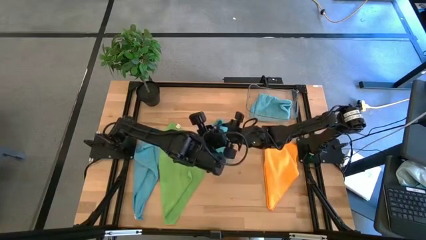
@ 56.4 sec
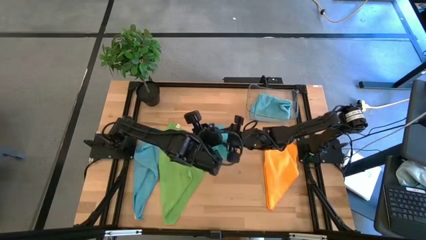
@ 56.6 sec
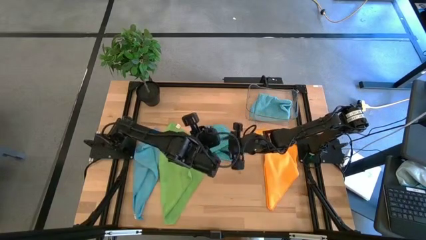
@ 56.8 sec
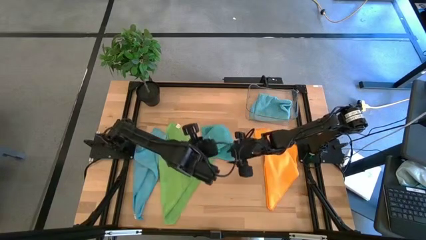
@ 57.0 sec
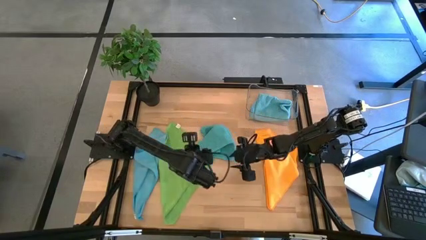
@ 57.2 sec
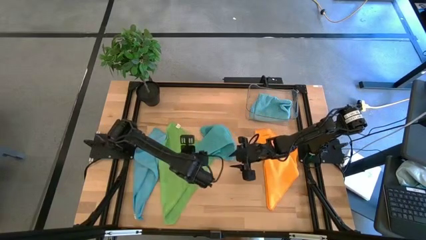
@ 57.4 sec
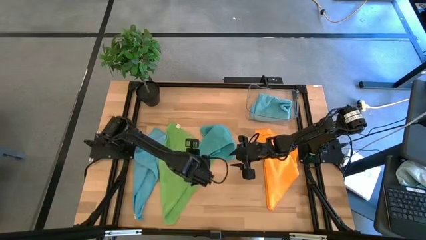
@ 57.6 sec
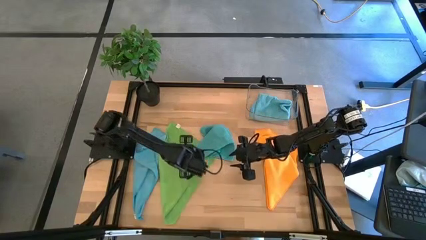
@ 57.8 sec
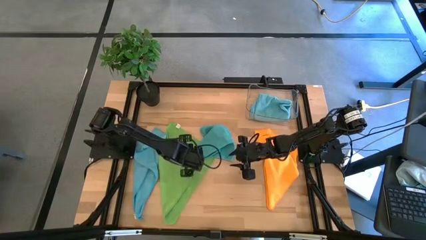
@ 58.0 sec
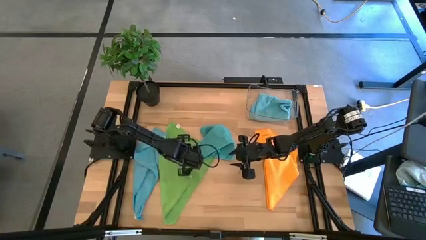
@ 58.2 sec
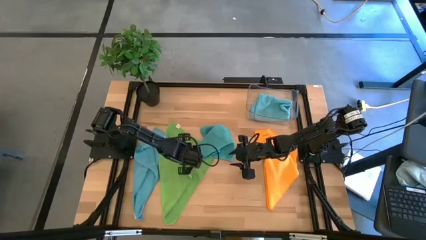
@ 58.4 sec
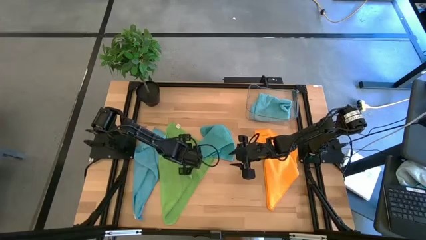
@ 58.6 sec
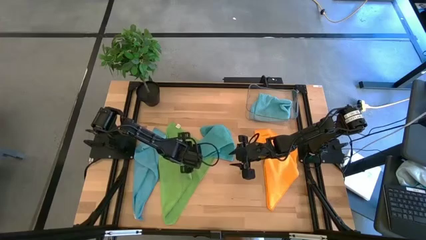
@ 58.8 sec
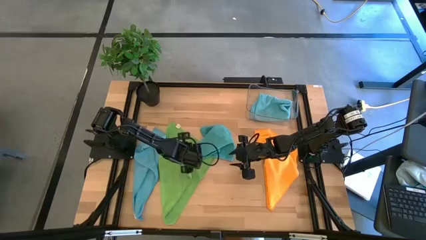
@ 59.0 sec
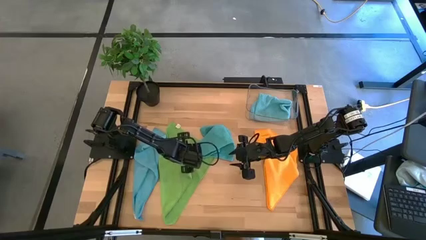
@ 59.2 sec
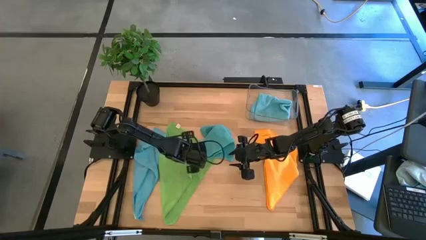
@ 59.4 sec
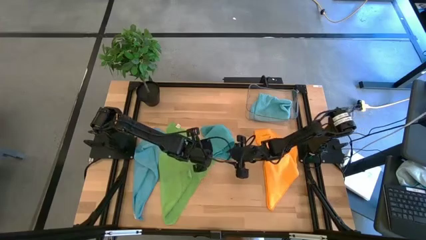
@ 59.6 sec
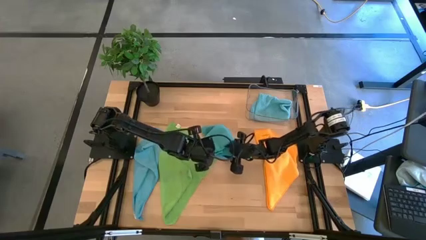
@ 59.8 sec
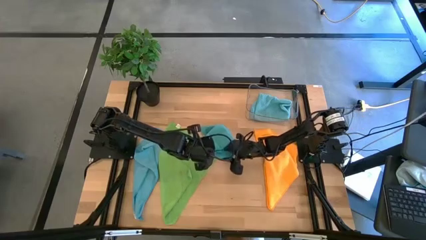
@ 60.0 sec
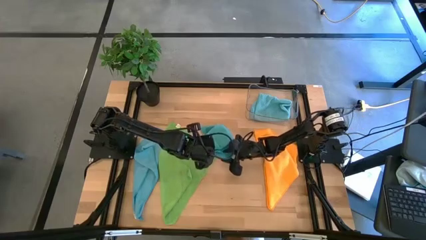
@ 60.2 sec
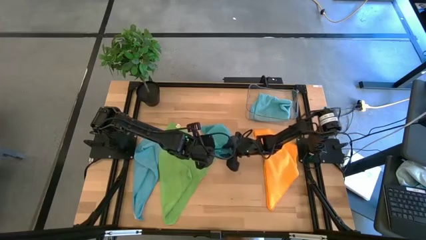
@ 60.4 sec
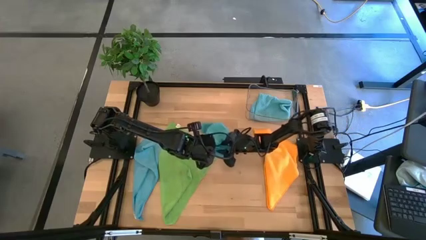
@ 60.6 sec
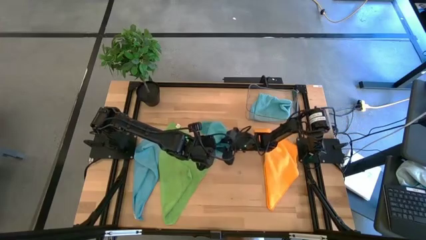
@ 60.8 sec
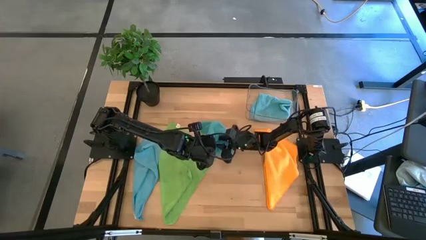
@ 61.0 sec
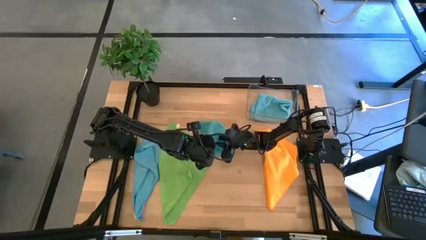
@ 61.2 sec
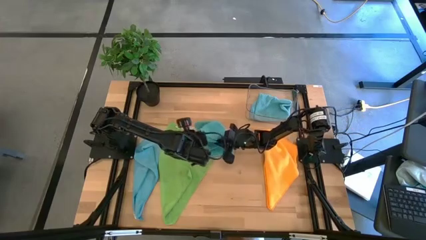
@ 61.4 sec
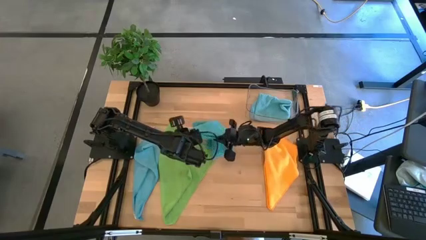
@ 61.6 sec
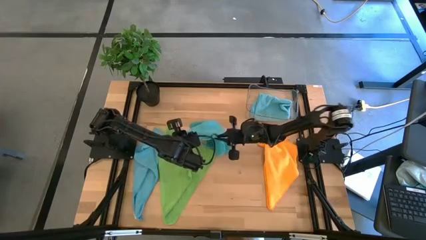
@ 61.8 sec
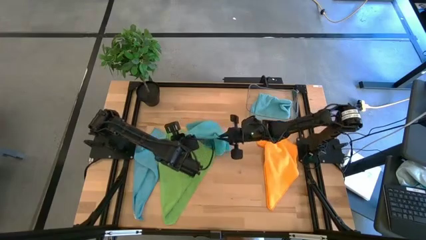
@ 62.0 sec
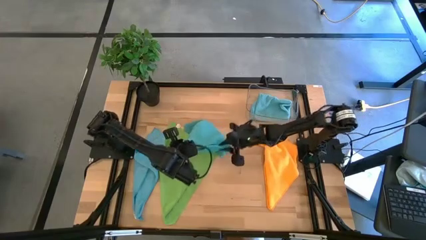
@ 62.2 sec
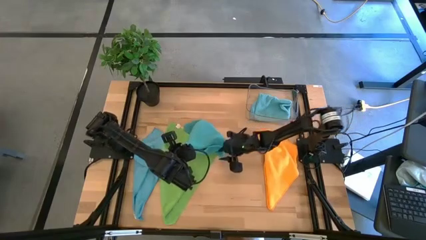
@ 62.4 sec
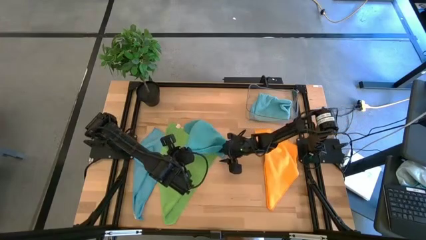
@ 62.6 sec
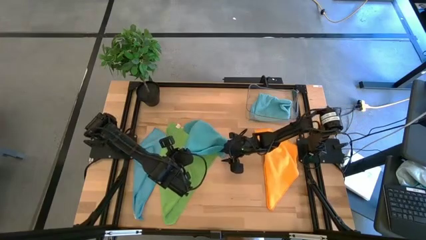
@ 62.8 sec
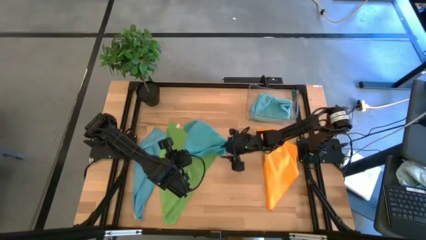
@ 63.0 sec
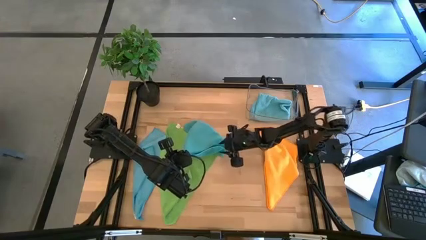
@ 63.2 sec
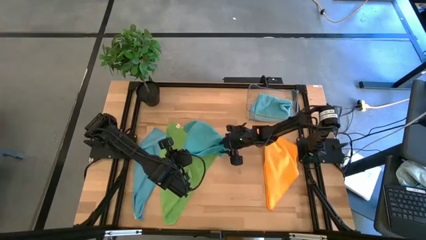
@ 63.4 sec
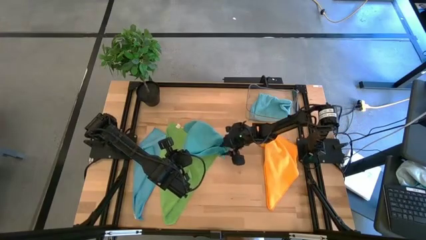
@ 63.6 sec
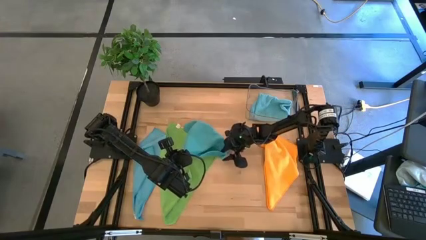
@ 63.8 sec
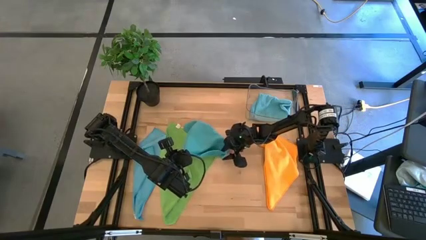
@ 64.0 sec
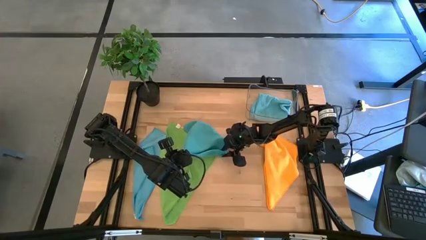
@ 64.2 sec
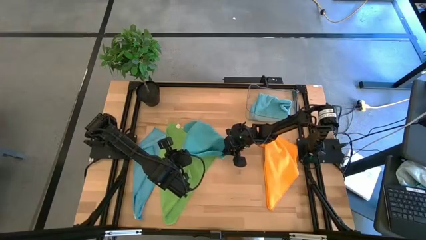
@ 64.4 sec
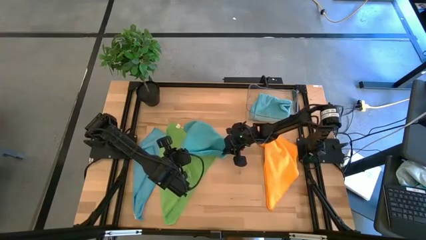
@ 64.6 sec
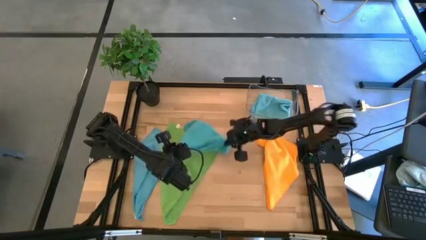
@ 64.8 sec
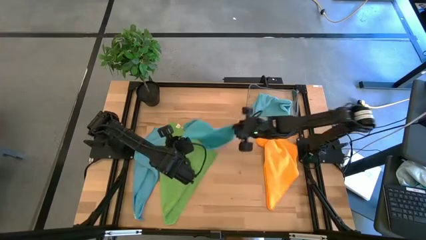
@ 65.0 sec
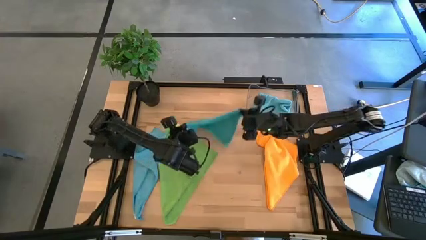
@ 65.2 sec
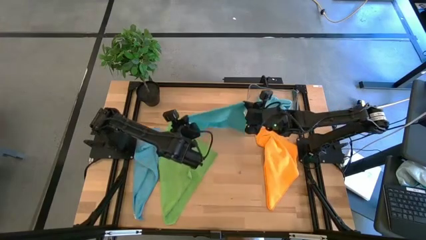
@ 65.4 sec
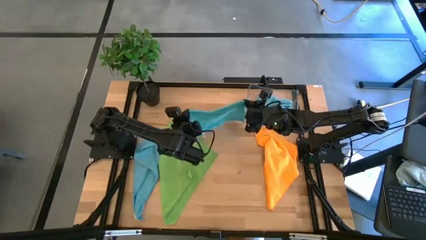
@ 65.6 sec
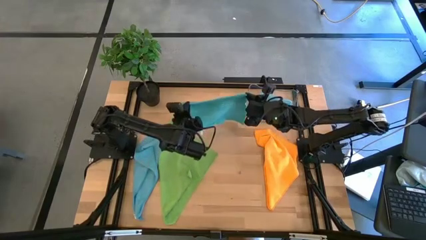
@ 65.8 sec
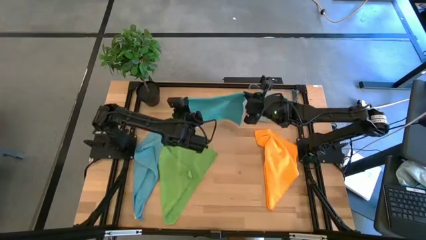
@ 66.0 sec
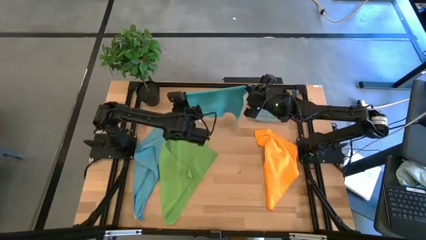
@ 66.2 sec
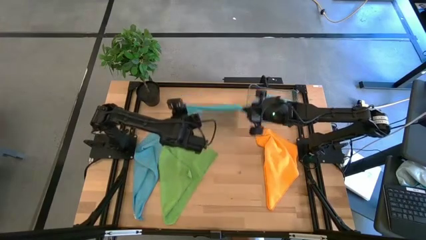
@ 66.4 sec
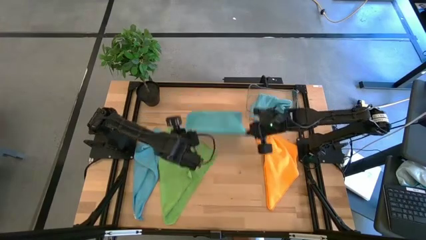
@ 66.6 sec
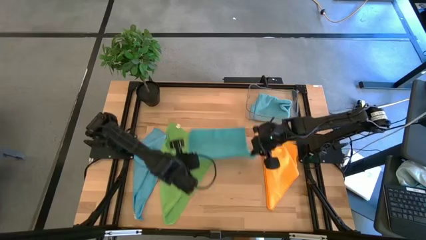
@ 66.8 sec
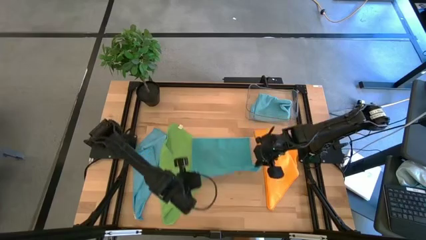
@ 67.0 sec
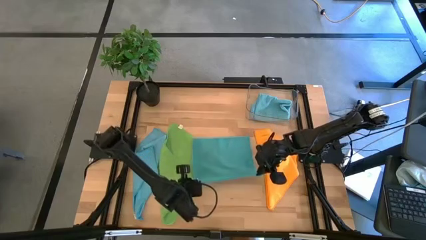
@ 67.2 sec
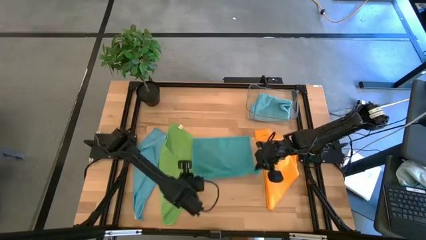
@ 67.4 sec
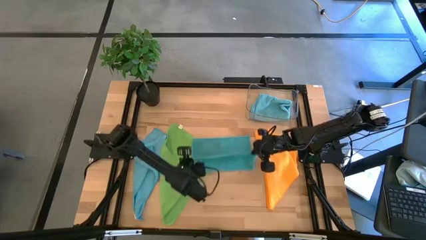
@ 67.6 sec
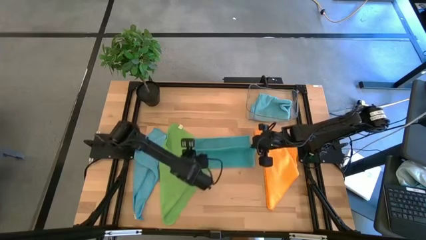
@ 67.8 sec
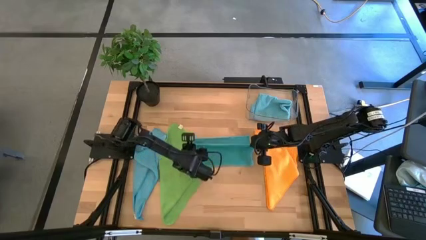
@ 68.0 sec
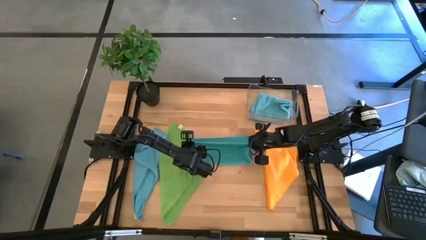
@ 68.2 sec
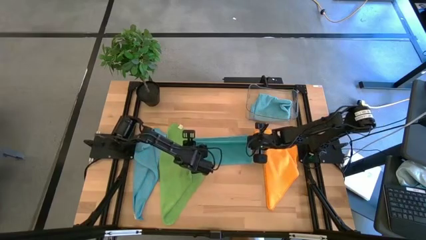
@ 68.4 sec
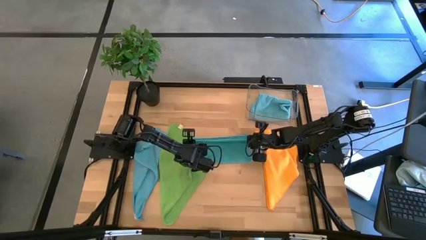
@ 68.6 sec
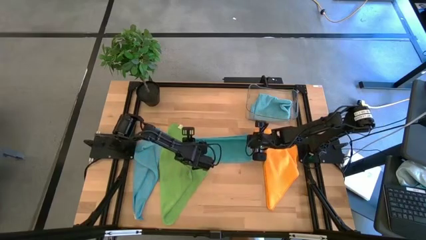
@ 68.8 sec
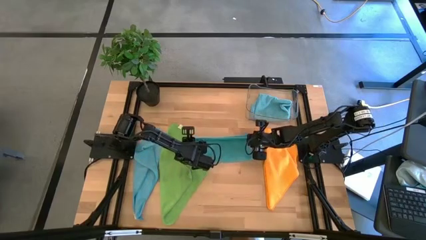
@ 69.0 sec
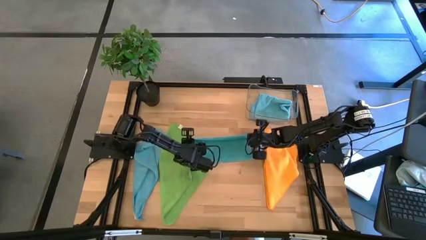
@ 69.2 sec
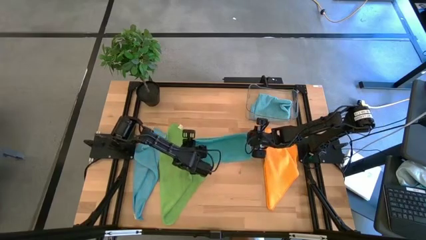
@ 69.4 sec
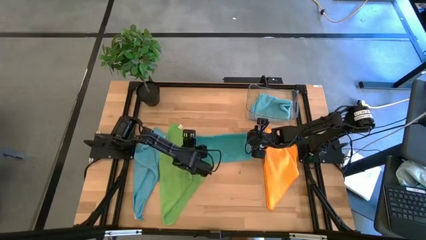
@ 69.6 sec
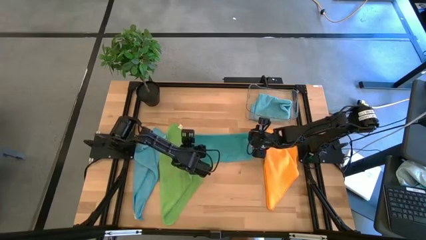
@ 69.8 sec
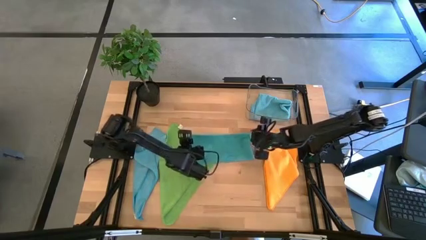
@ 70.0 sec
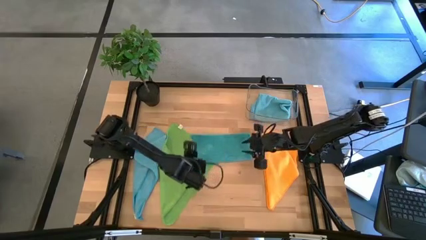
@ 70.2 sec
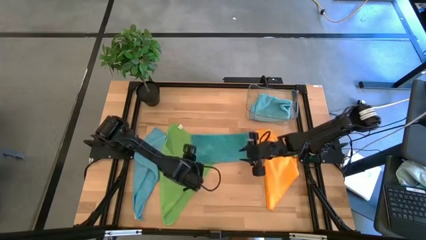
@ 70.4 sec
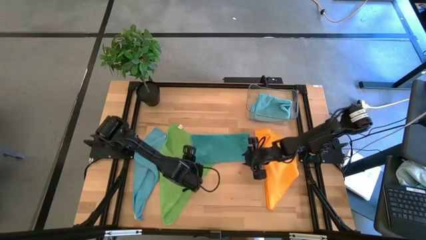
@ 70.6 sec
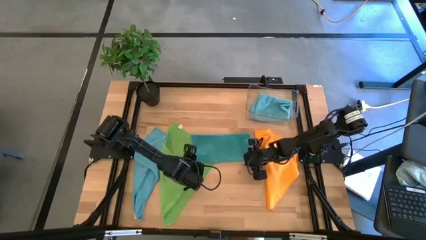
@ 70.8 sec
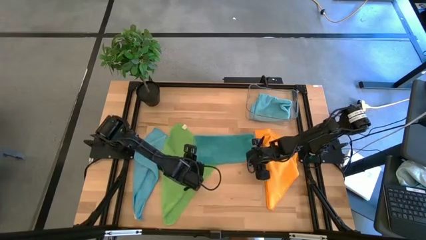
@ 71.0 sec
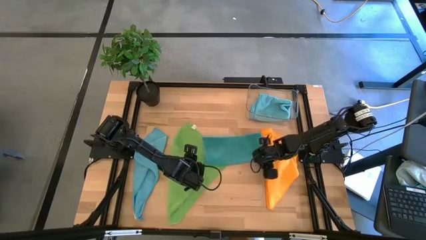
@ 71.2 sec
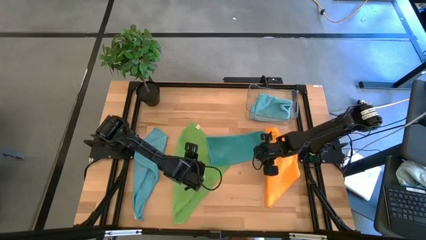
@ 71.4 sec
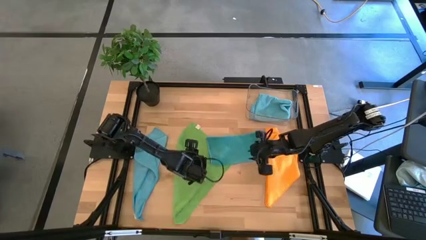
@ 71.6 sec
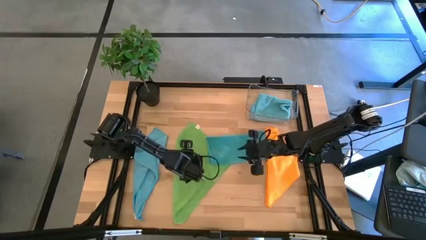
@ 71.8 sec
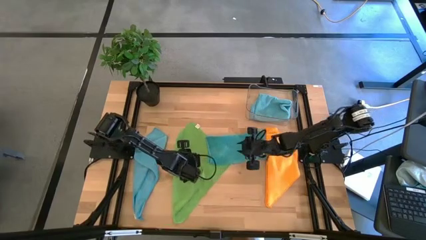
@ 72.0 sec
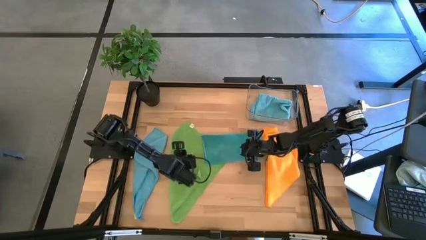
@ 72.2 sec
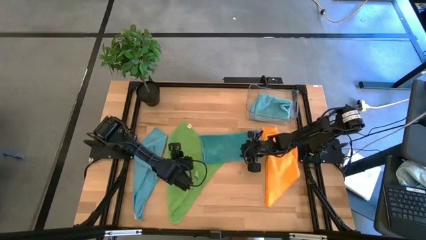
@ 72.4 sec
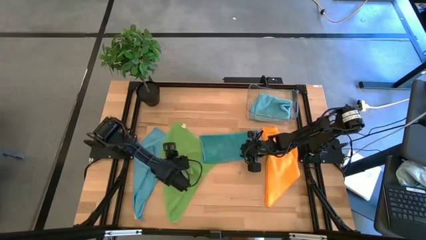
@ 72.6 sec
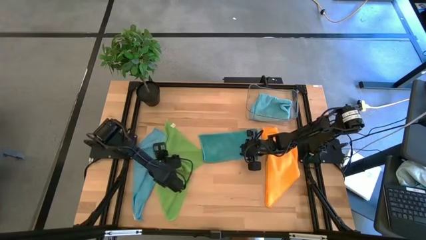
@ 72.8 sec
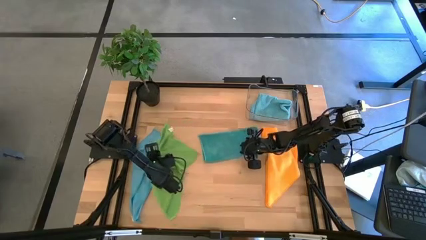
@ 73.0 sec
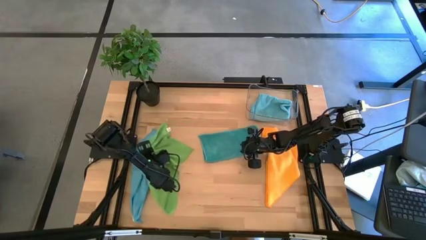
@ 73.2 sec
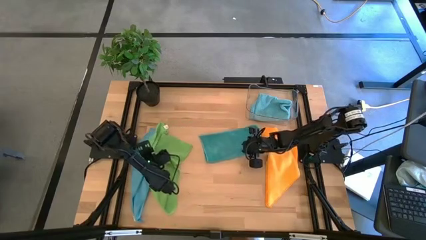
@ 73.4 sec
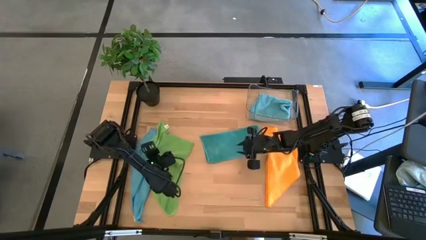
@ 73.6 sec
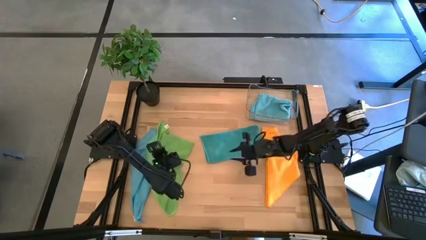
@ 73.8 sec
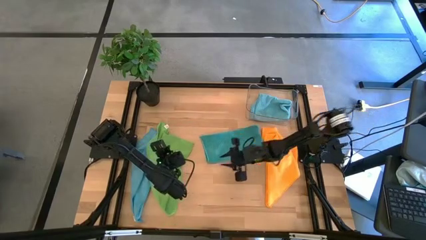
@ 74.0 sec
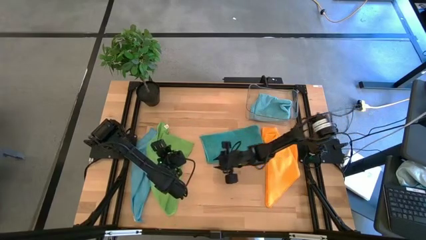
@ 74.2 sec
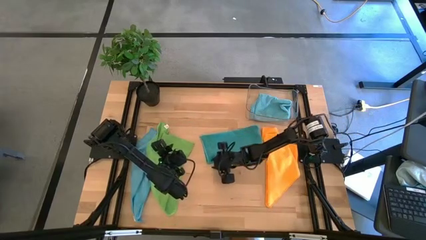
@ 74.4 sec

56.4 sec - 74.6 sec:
Task: Fold microfiber towels
Fold the blue Fold the blue microfiber towel
